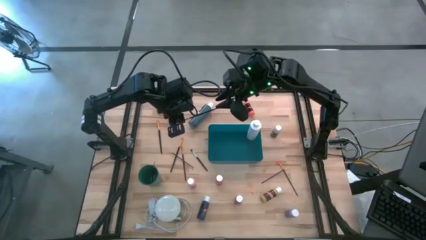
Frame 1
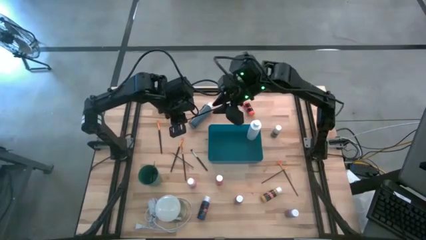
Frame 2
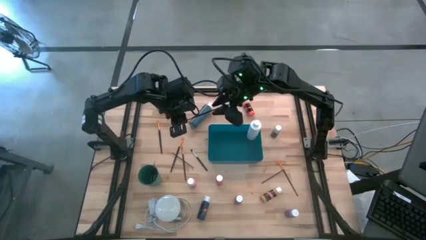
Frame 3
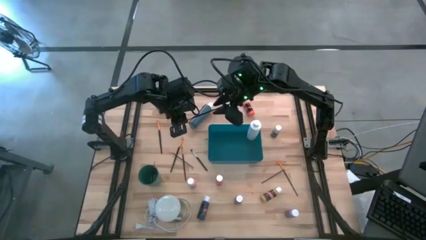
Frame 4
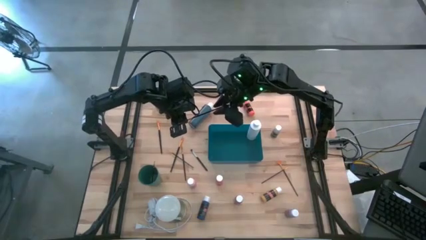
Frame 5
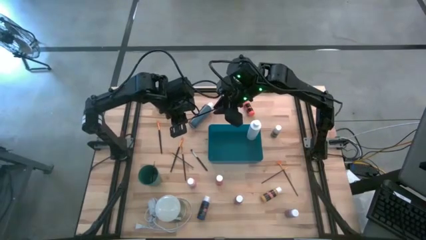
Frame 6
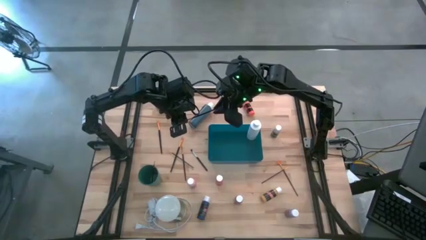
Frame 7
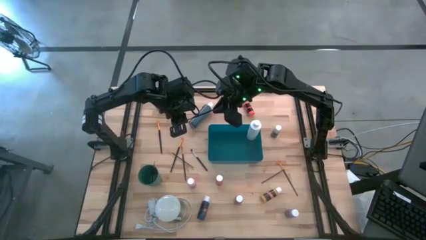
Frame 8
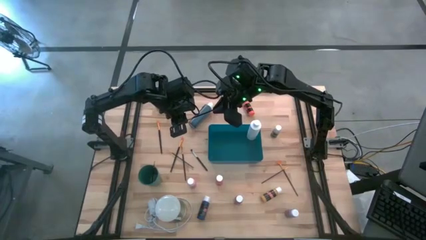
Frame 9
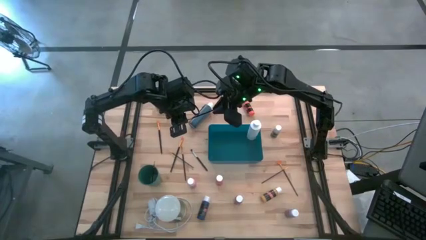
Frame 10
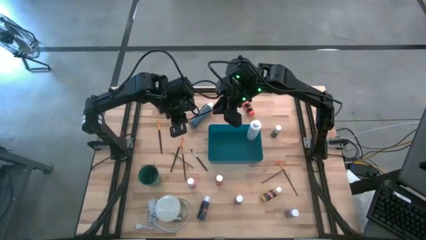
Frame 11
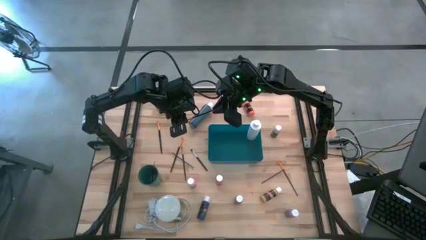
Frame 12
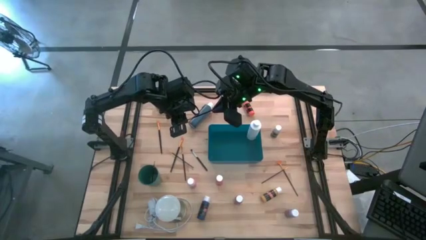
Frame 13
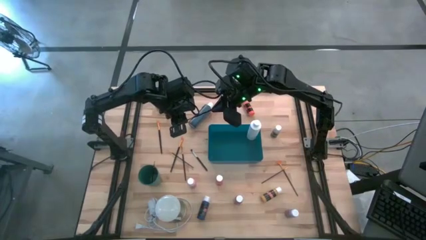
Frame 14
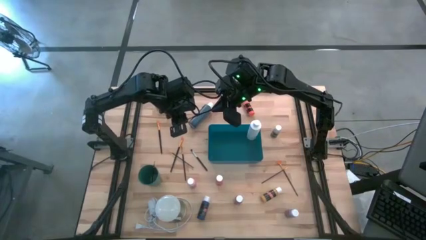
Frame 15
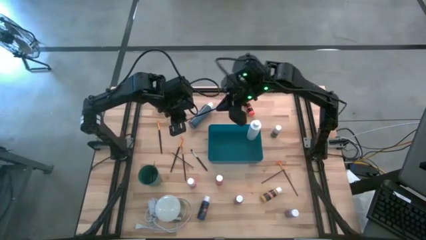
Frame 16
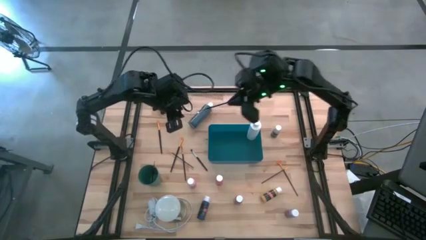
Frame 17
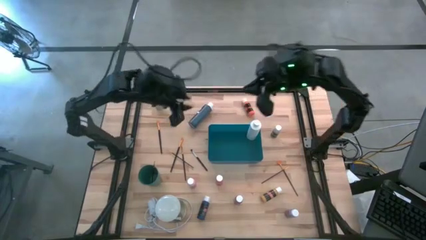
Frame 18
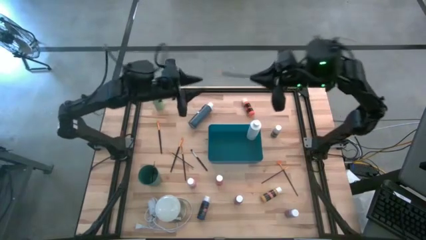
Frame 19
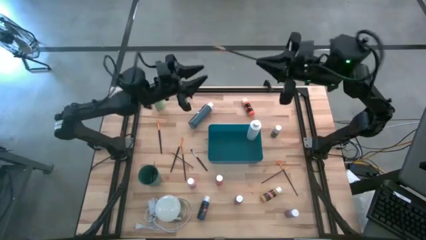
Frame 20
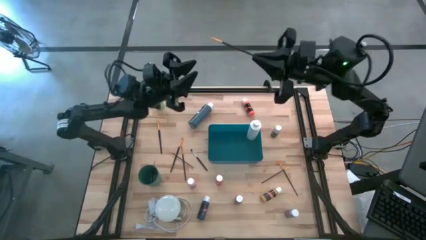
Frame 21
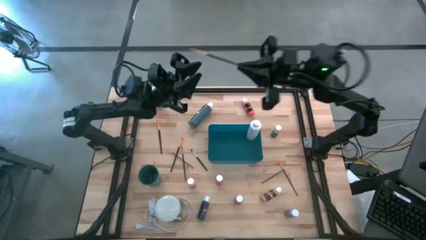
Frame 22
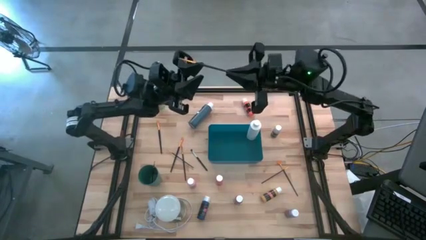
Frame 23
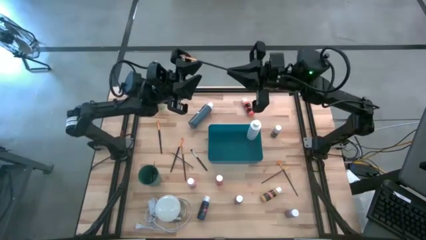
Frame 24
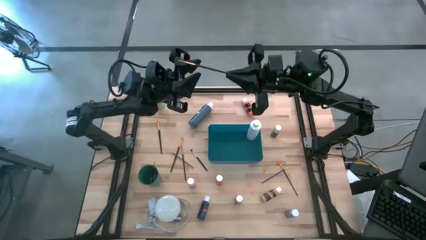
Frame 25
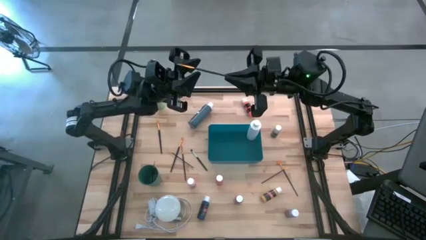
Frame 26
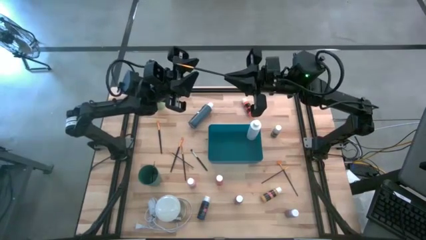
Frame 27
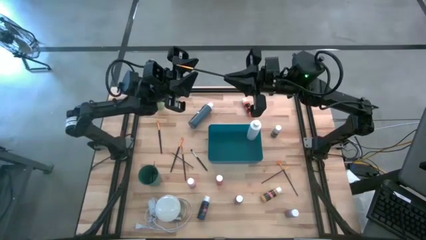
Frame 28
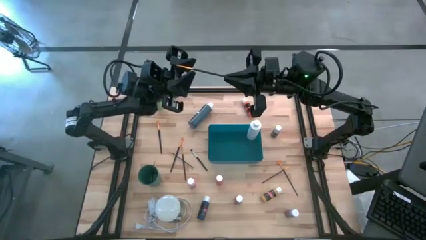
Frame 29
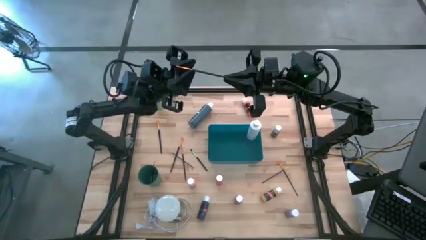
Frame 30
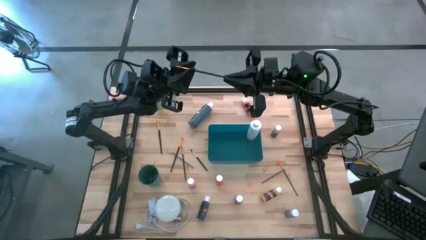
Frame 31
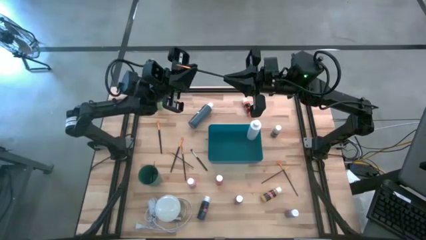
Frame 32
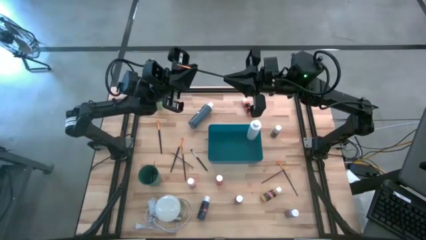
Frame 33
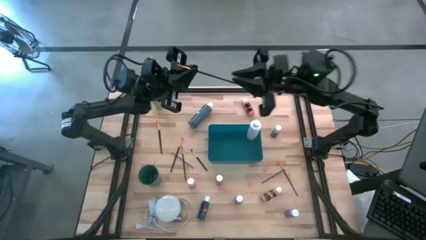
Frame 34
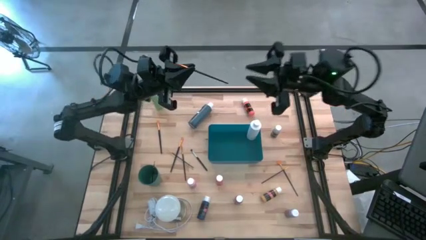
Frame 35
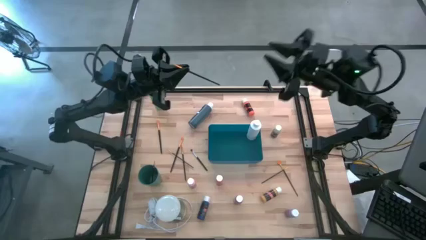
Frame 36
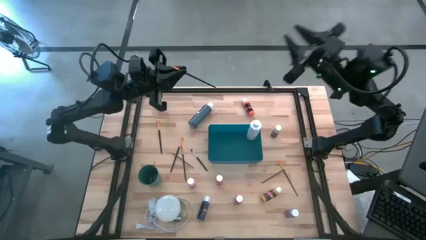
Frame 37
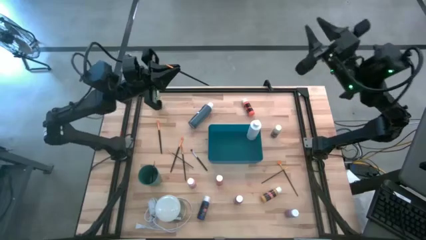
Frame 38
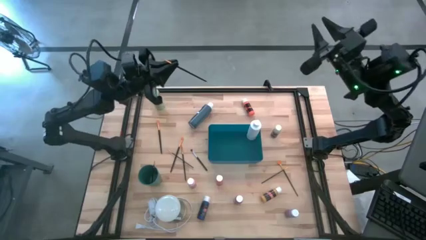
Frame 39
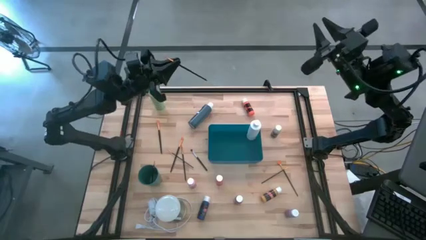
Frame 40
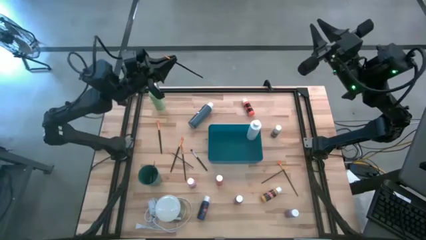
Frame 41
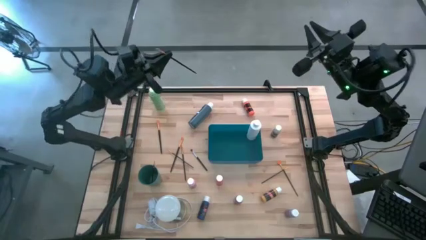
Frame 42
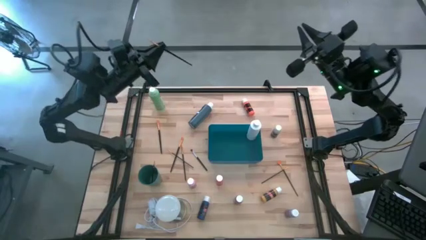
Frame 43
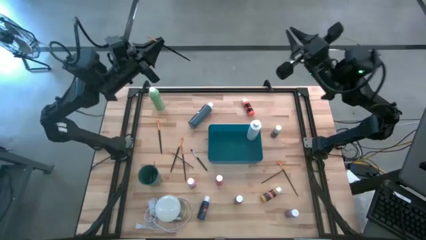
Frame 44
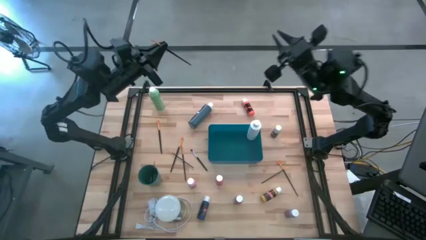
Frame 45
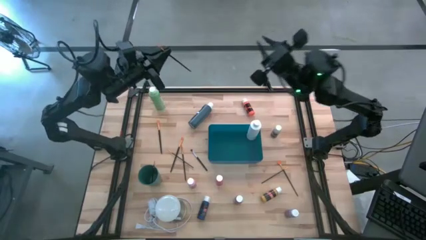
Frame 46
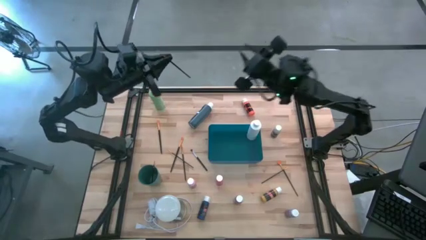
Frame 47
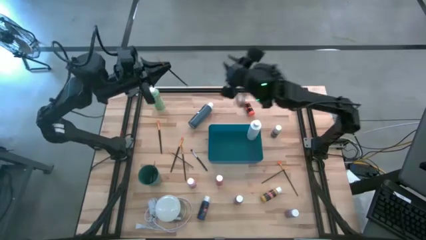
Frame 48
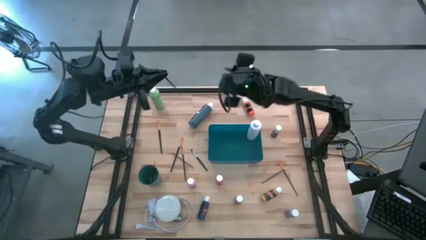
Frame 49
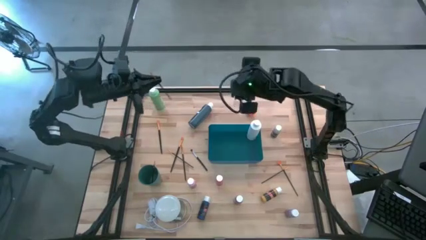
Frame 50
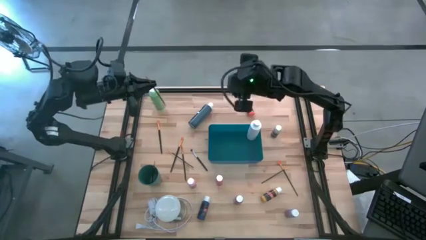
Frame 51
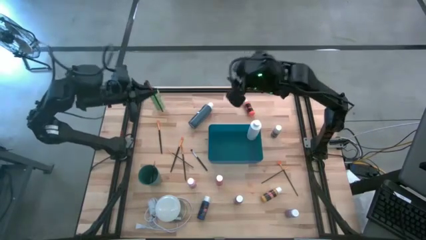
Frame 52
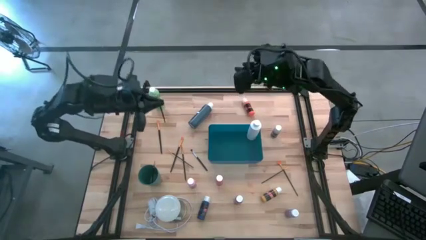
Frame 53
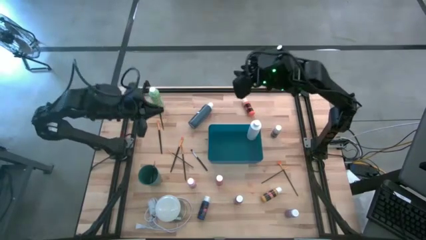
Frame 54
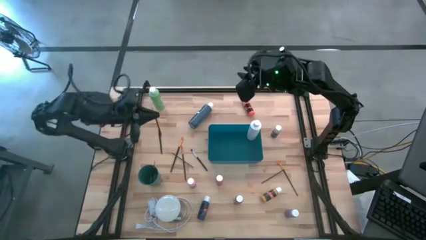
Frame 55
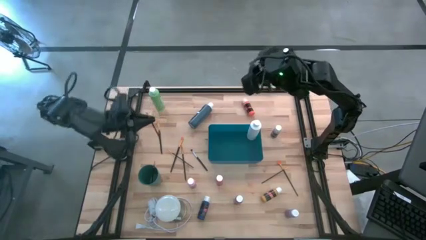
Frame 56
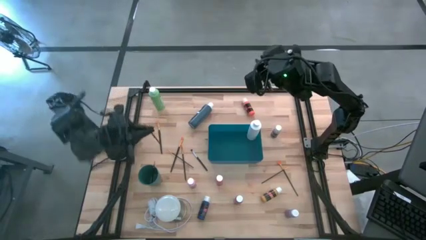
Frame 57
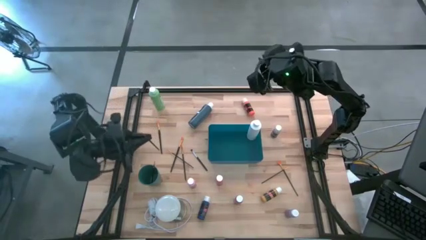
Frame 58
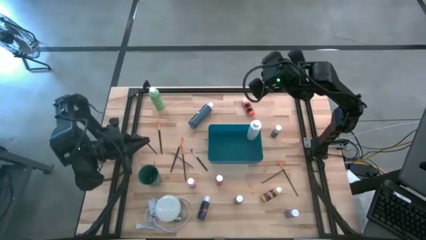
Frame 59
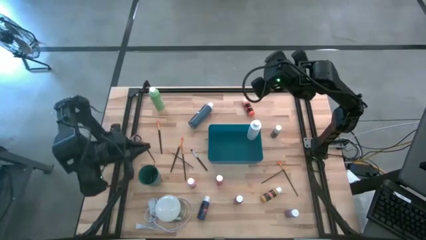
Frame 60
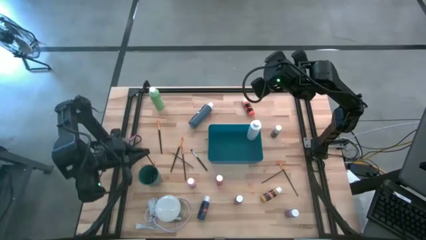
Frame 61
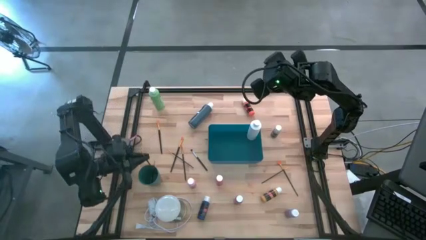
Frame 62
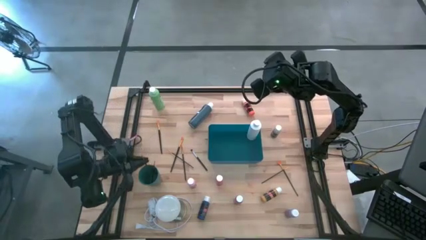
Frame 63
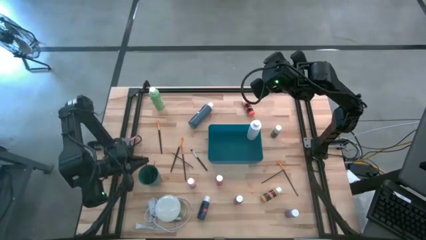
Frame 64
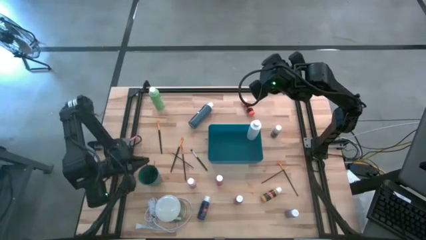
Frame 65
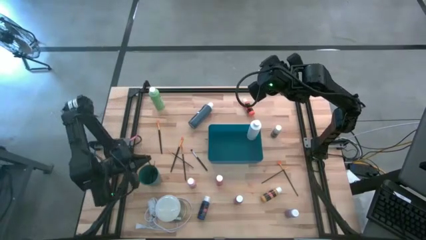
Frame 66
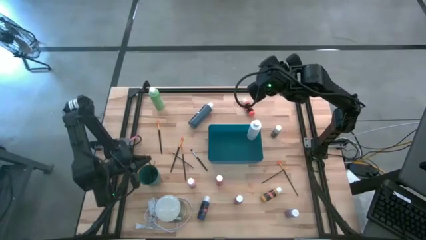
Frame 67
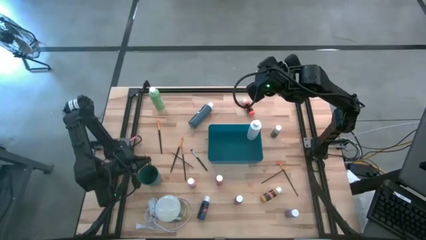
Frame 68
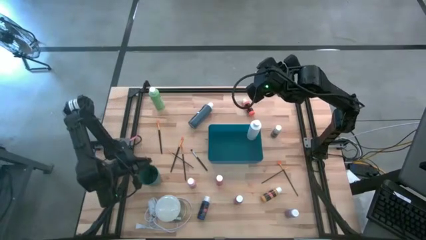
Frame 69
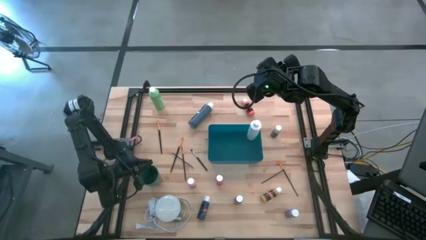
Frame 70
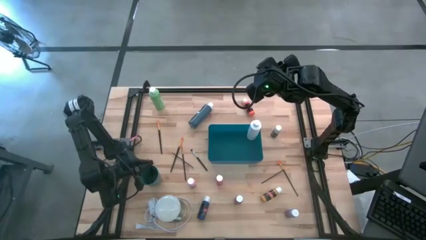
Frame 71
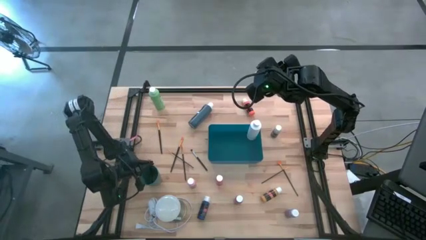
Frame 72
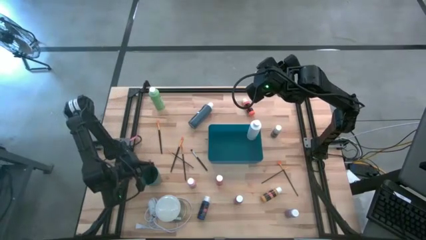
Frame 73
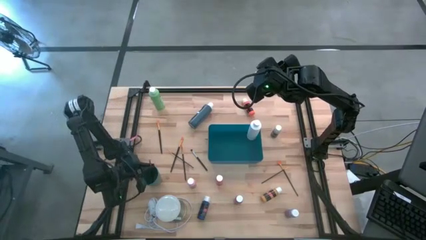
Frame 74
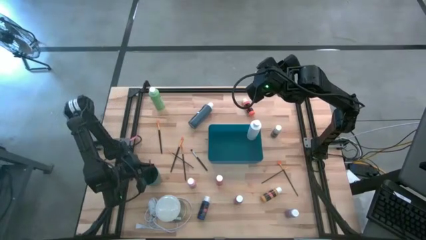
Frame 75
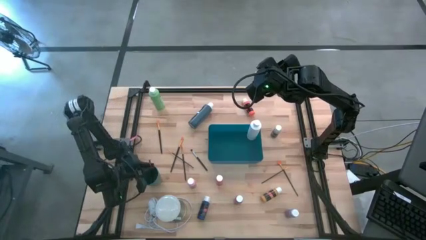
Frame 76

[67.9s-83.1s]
Task: Pick & Place Paint Supplies
Put the gold paintbrush into the green cup
